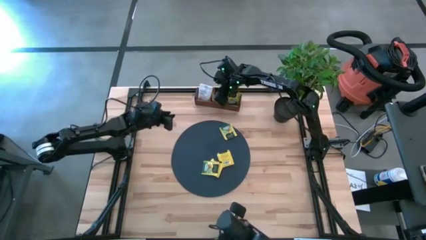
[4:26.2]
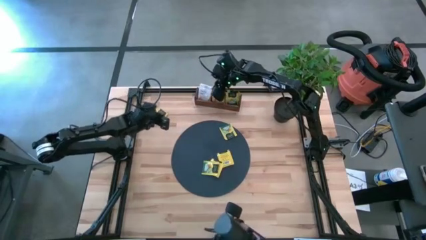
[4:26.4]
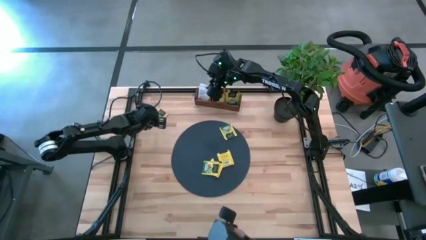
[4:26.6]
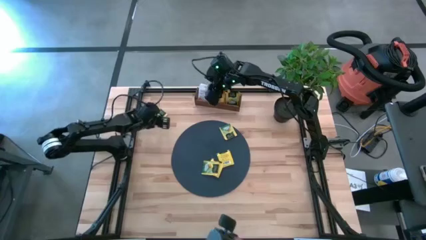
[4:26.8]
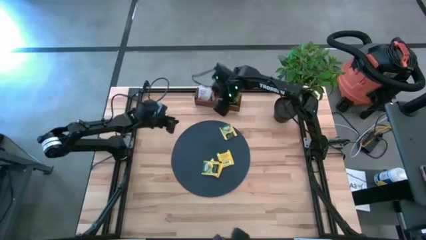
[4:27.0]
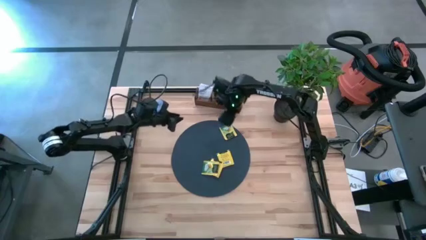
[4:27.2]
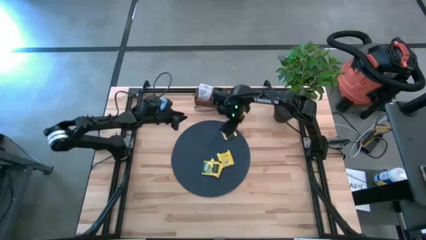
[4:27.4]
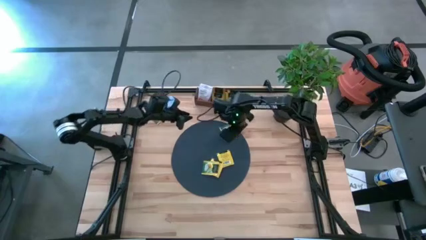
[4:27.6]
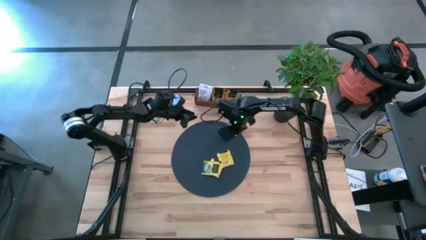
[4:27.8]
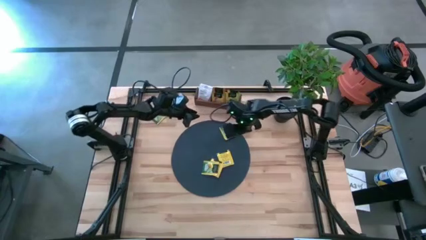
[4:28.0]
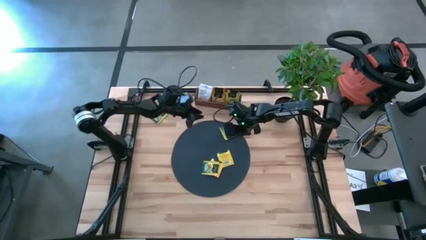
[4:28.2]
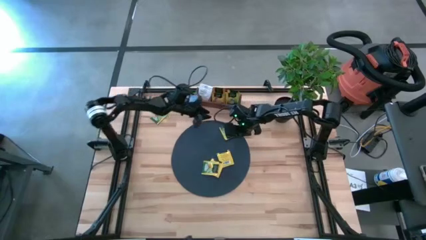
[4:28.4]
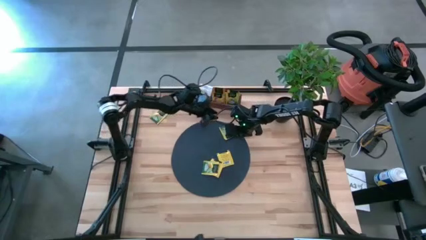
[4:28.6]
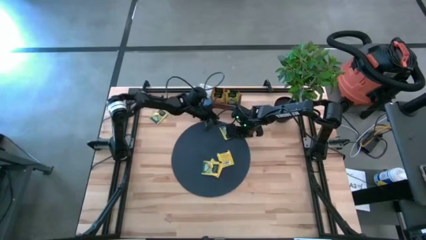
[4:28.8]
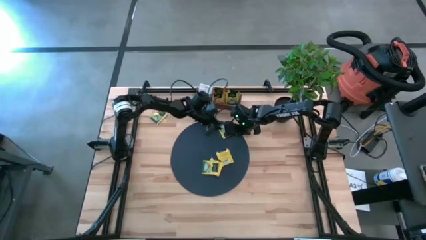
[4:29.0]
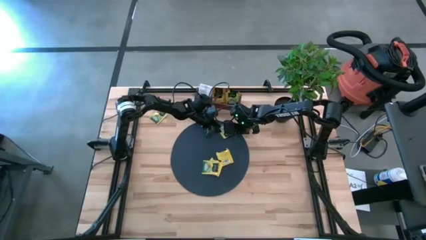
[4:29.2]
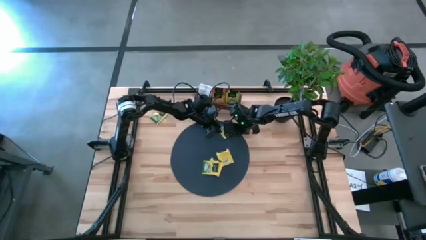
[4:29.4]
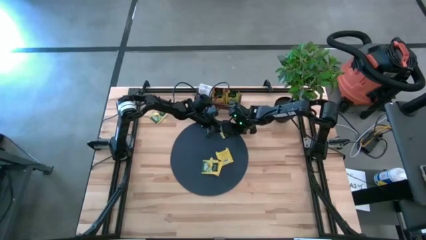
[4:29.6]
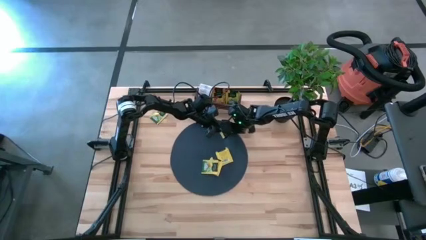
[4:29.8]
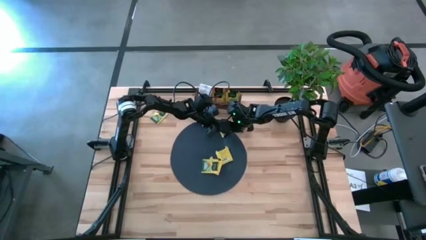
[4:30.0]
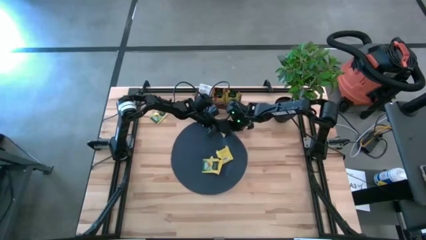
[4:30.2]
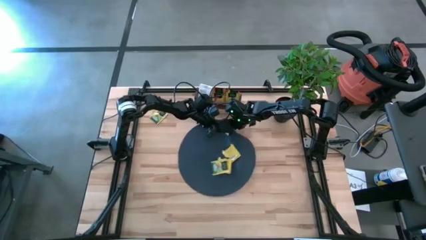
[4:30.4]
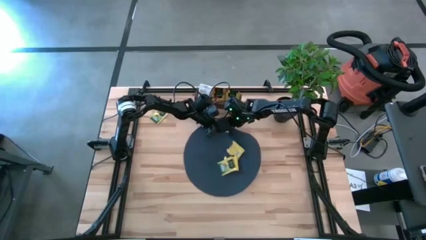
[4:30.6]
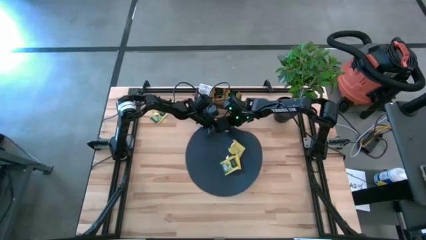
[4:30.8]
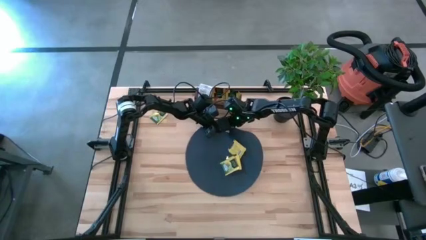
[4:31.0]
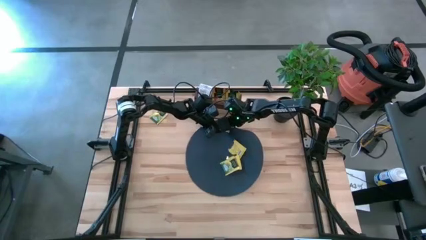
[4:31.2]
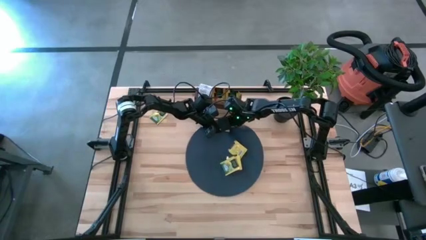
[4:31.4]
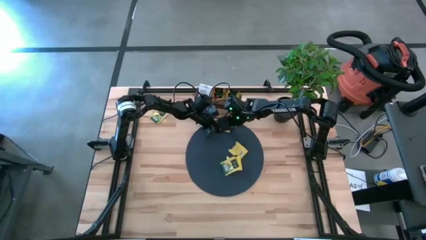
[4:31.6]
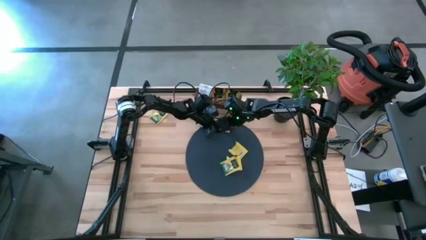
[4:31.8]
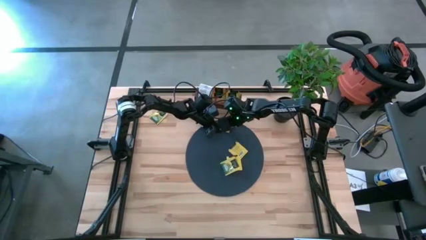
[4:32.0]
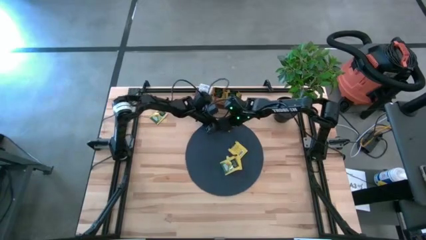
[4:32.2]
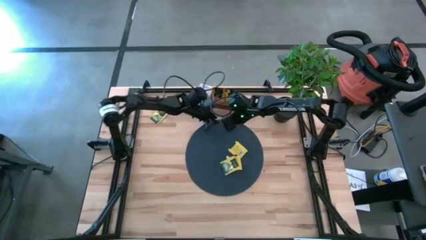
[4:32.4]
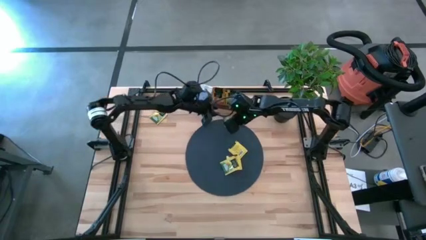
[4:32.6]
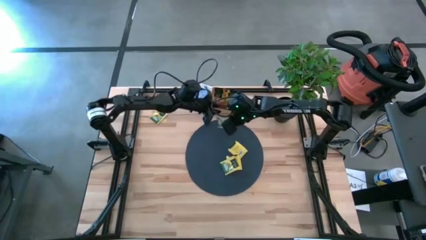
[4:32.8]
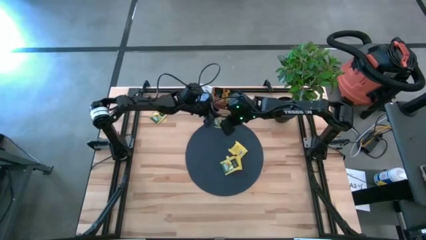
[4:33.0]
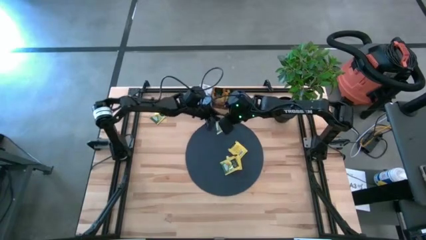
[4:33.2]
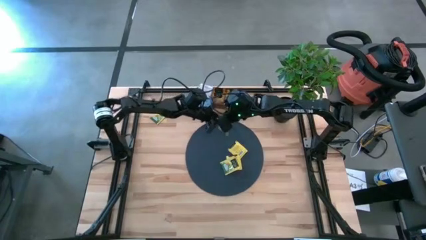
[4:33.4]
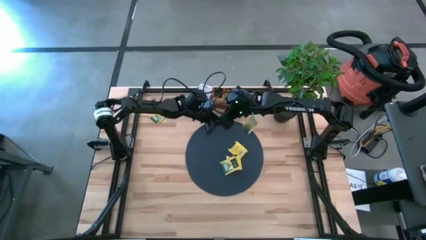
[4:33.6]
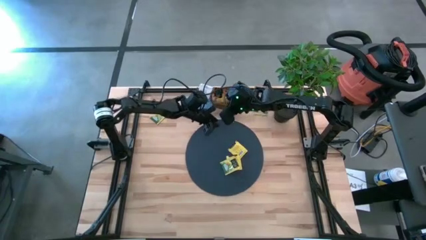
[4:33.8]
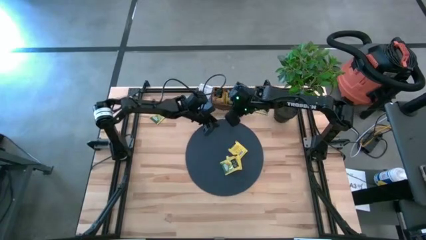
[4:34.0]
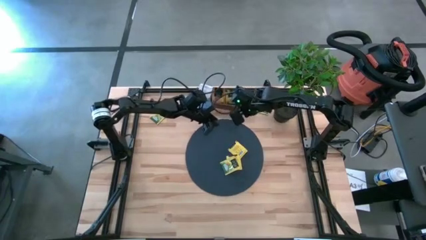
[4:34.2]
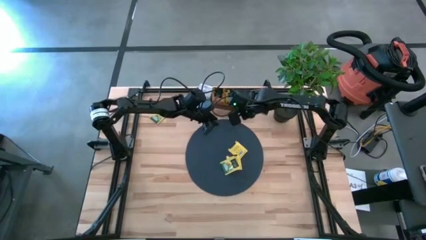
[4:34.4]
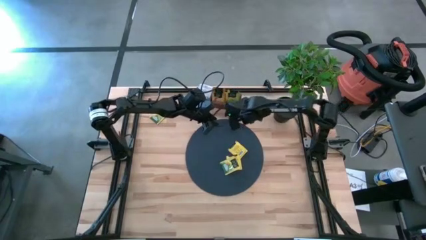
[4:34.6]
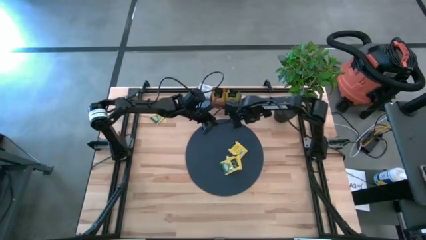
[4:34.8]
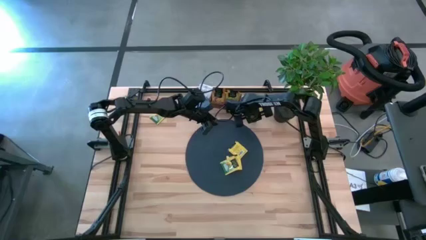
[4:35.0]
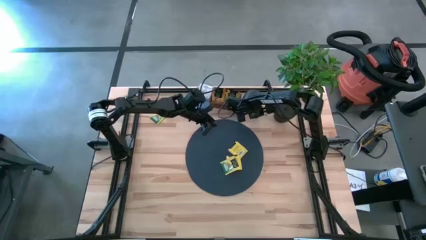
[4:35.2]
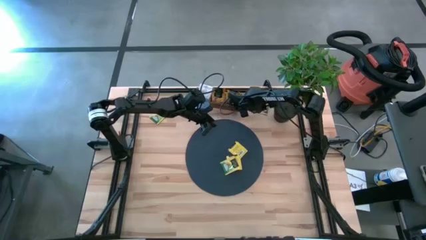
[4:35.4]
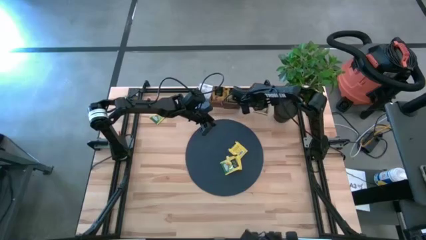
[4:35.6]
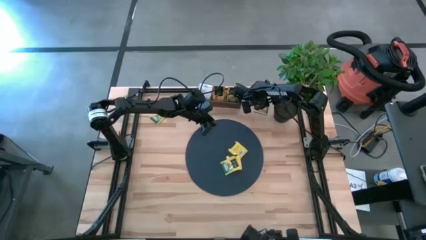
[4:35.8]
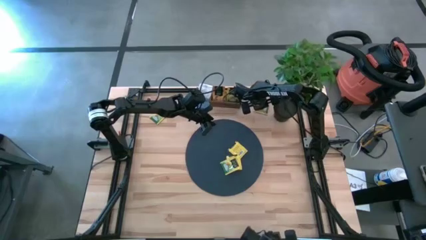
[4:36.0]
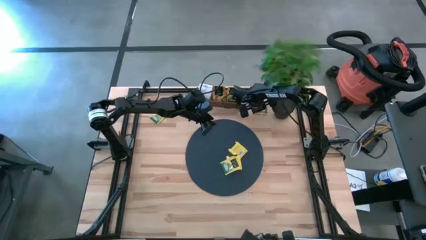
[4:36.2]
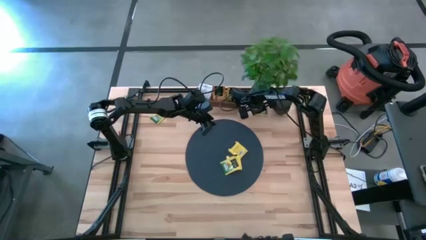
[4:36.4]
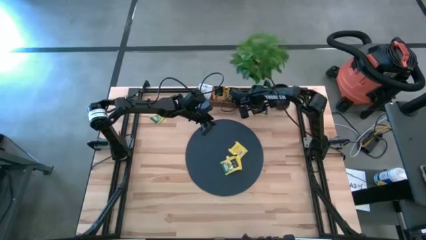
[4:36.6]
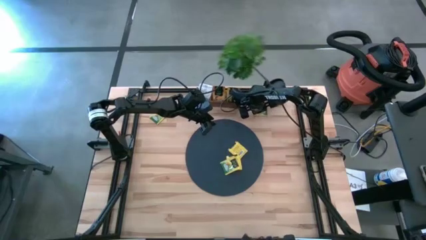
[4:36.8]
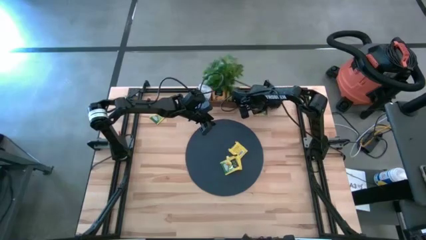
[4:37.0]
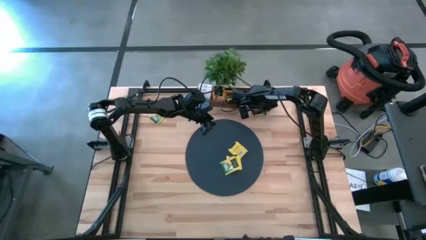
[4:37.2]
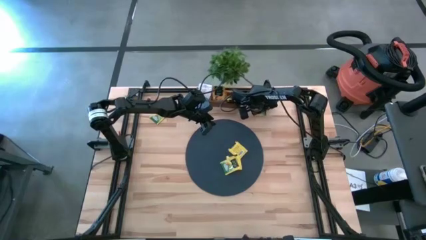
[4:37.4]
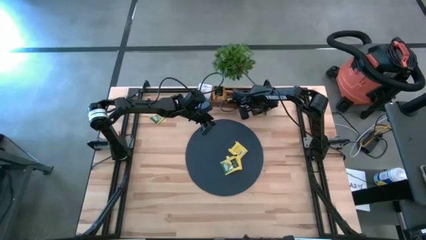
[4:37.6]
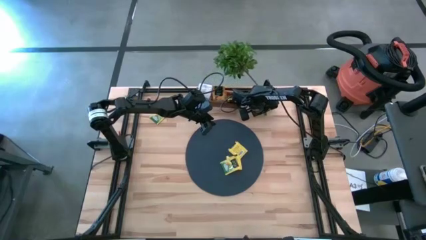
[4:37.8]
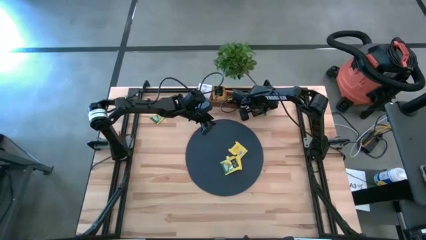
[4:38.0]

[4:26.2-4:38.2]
Task: Pick & Place Tea
Put the green tea bag into the right section of the wooden organizer

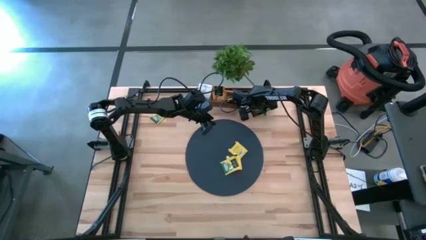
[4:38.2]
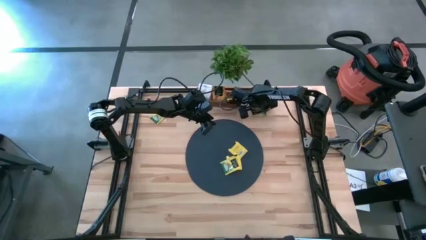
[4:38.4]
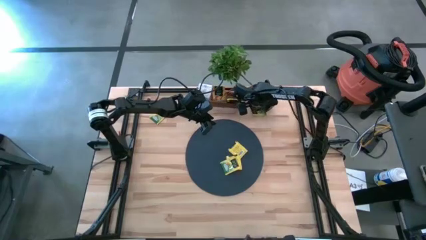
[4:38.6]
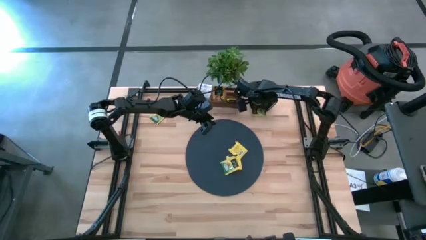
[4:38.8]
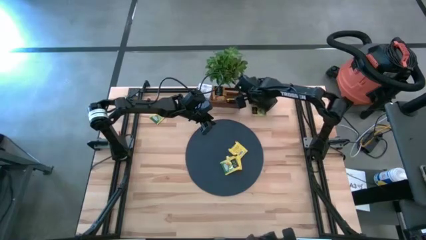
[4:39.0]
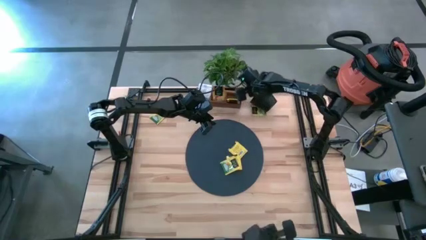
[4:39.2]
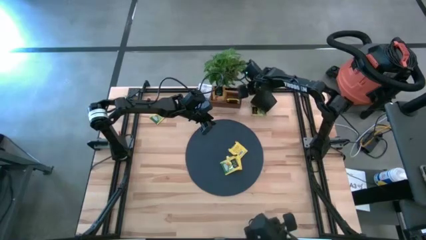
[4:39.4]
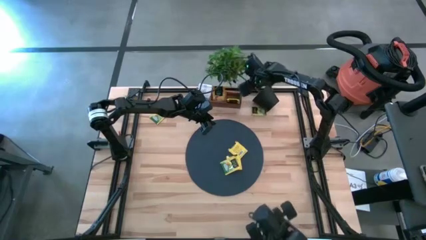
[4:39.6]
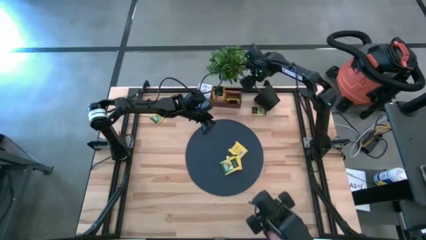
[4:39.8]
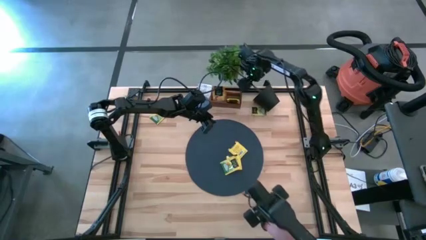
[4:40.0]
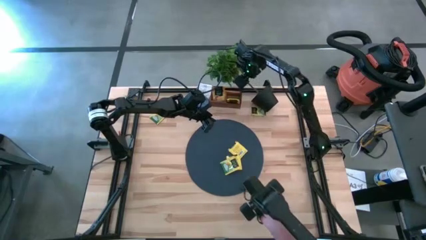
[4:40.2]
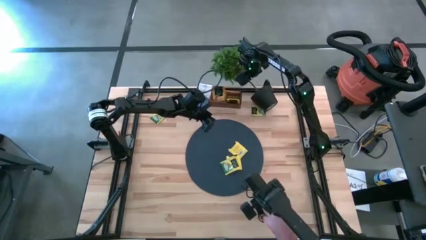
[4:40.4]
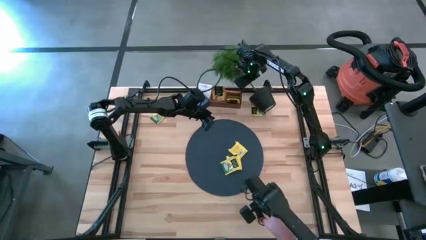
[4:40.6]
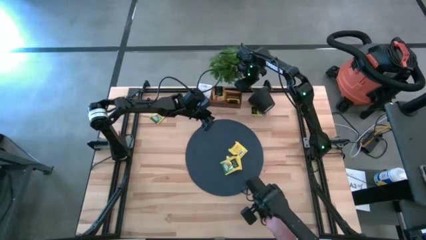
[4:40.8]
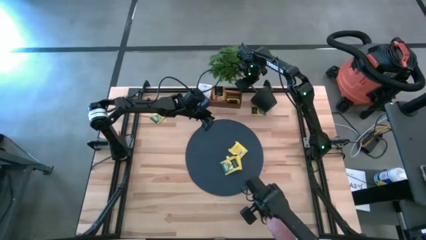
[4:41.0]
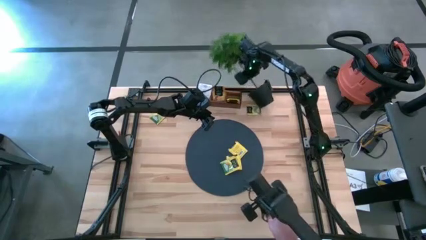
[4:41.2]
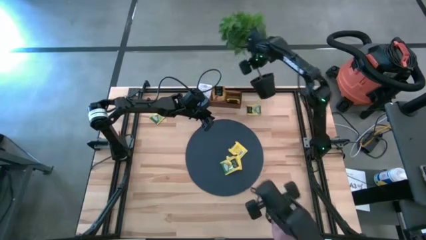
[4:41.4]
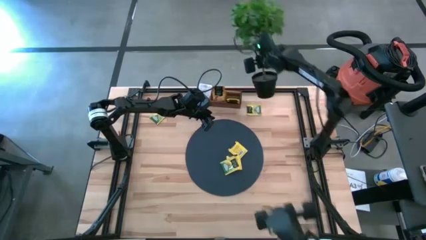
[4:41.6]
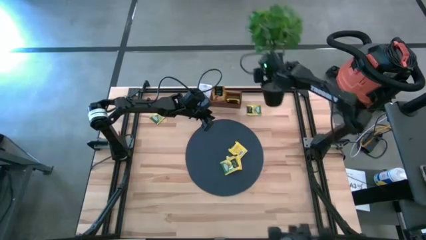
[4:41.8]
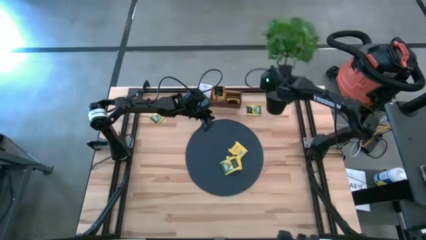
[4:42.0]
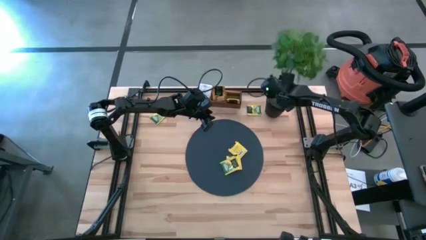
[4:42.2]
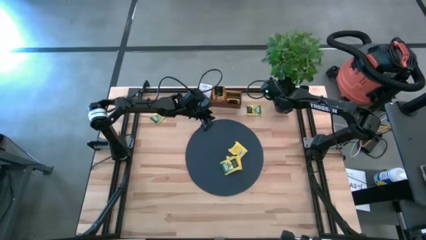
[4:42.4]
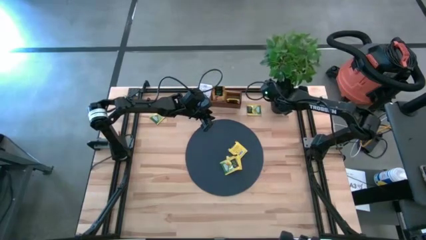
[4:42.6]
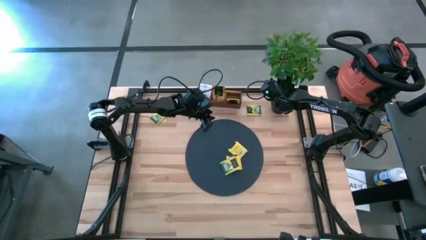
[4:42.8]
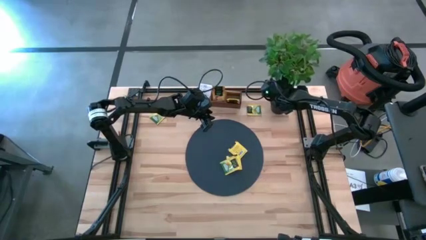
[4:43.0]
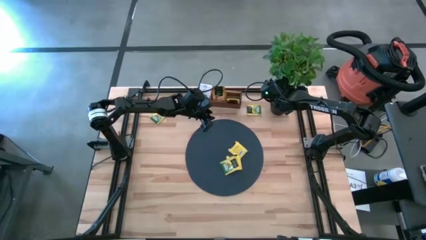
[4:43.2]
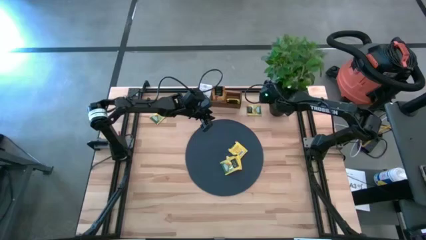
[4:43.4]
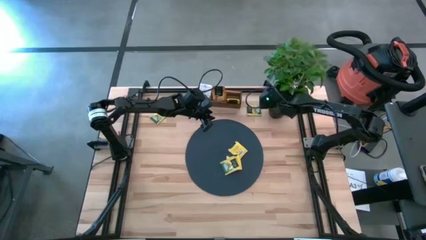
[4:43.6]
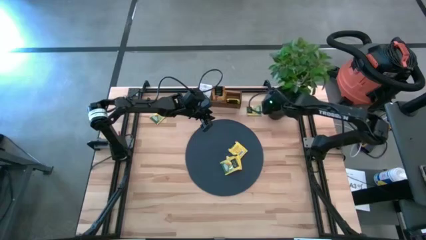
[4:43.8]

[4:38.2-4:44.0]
Adjust the black potted plant
